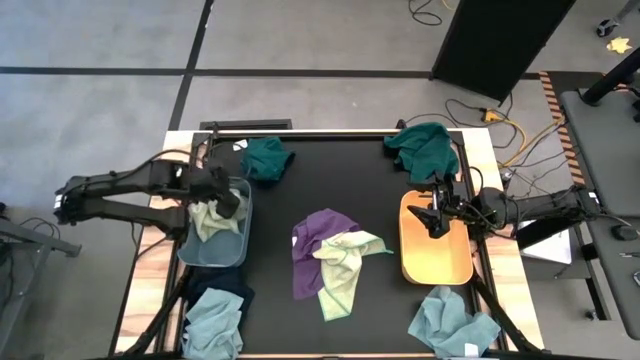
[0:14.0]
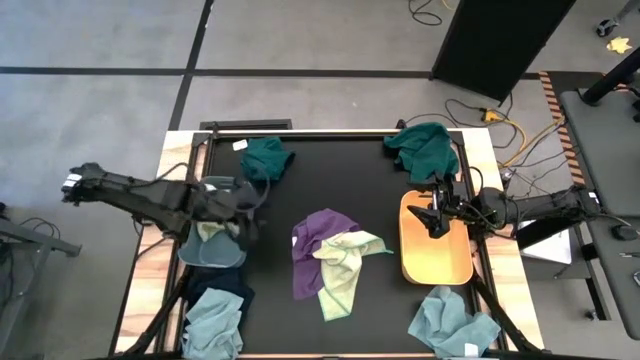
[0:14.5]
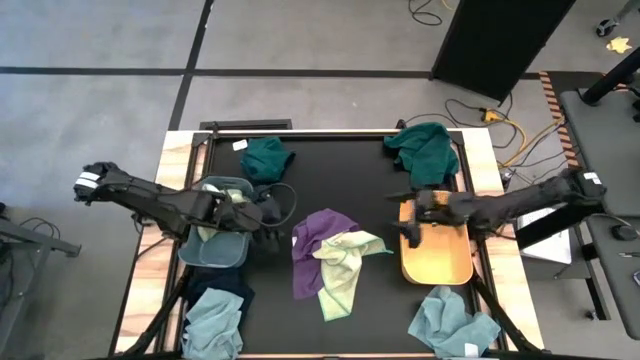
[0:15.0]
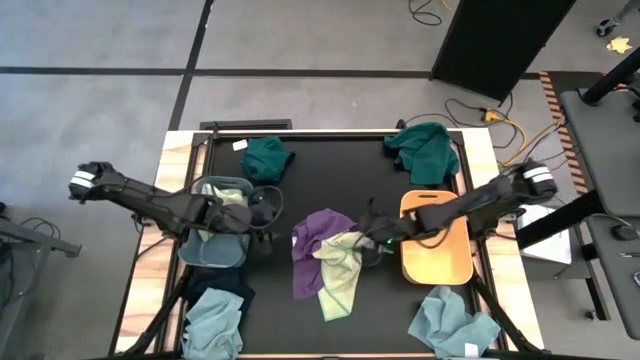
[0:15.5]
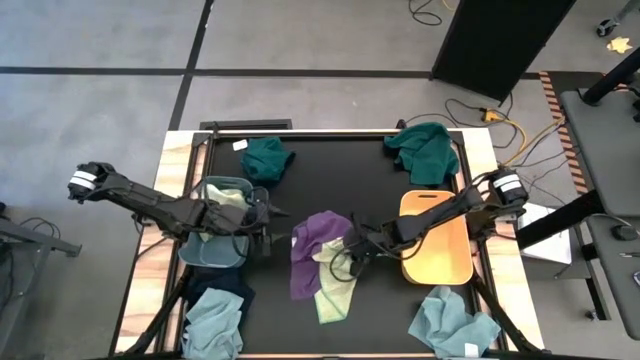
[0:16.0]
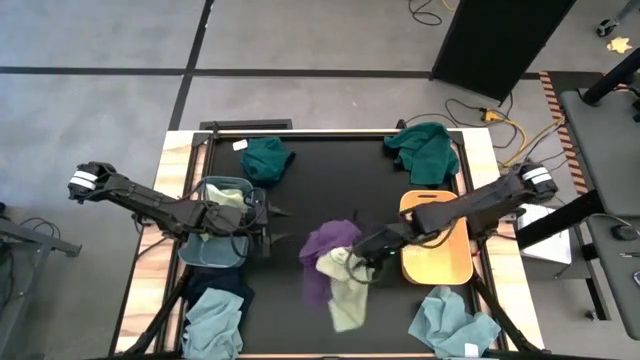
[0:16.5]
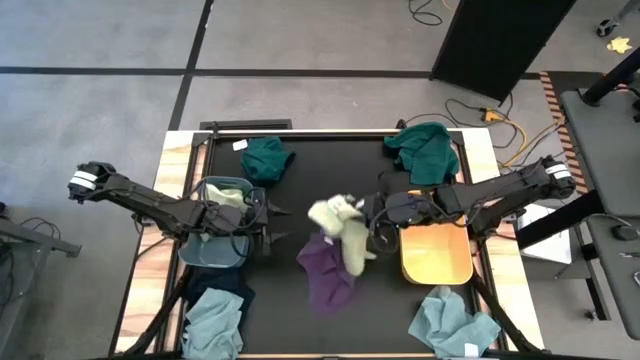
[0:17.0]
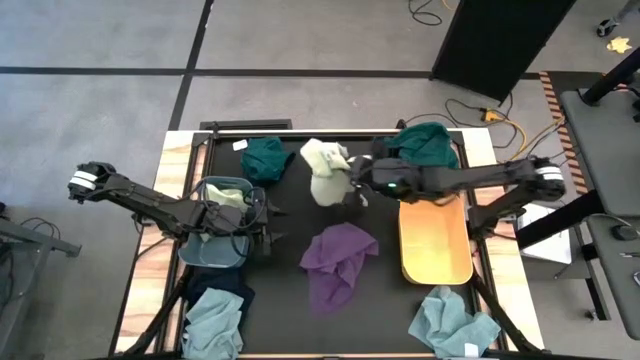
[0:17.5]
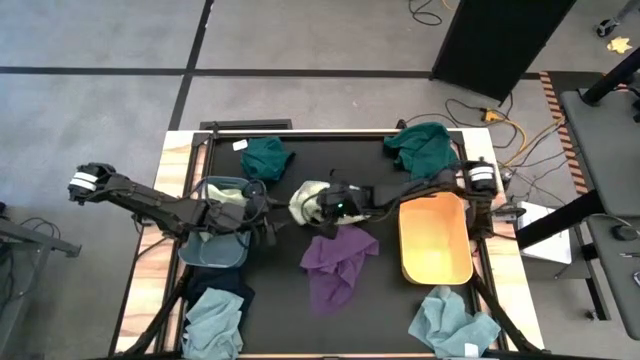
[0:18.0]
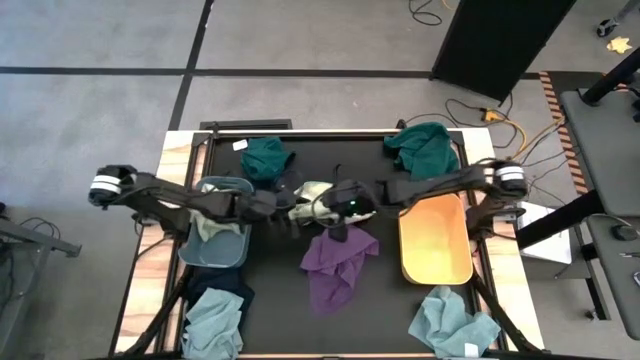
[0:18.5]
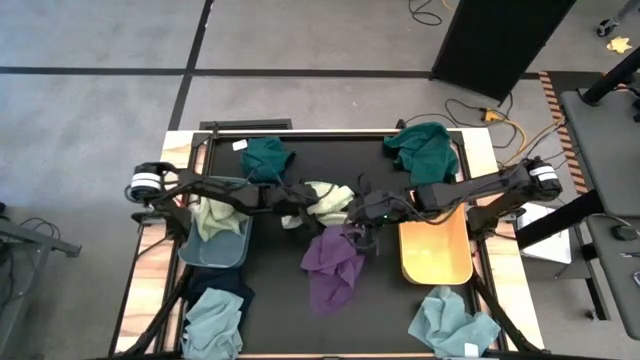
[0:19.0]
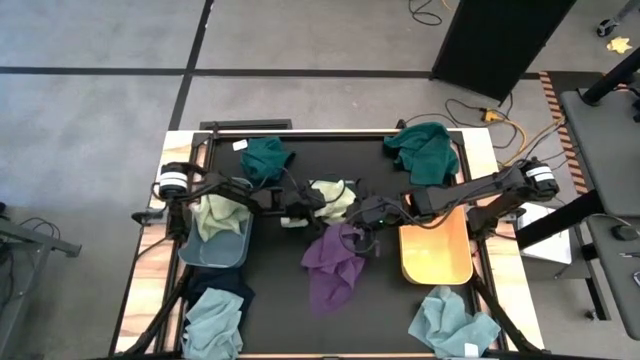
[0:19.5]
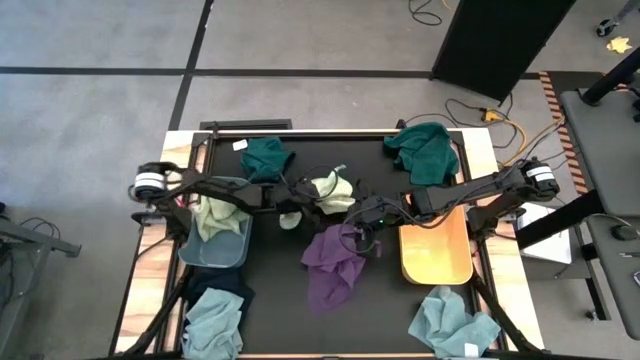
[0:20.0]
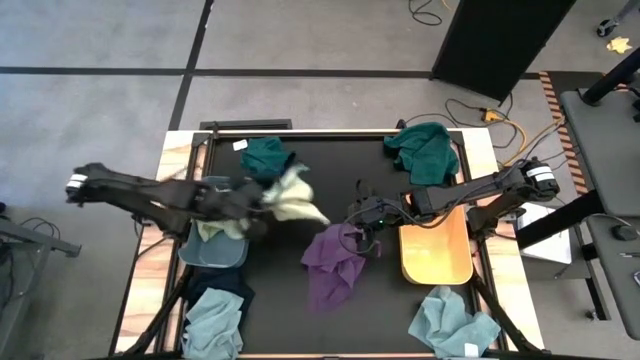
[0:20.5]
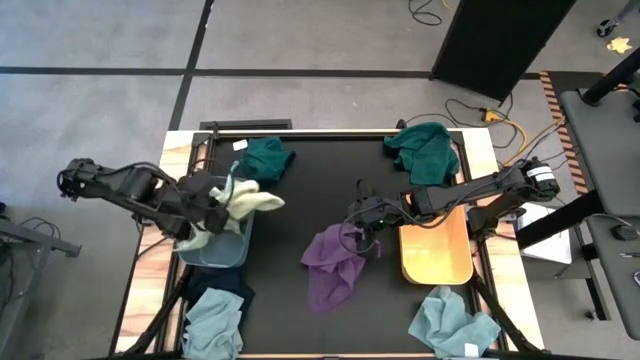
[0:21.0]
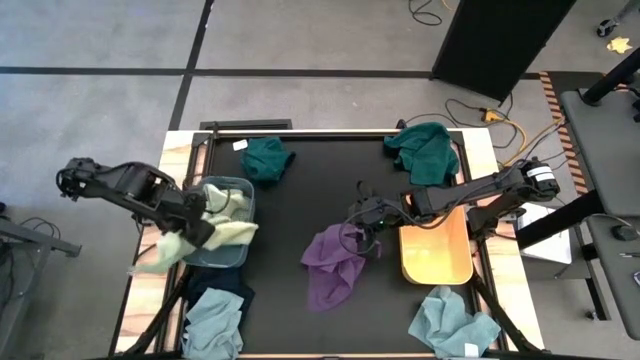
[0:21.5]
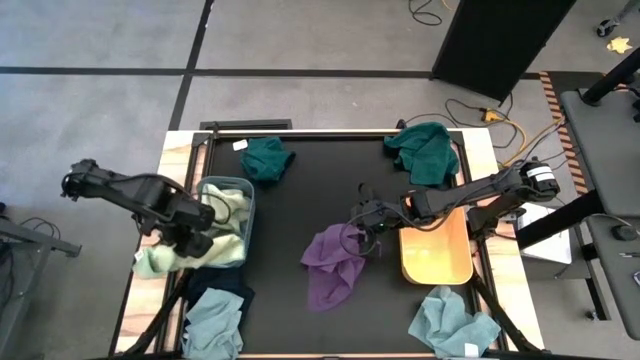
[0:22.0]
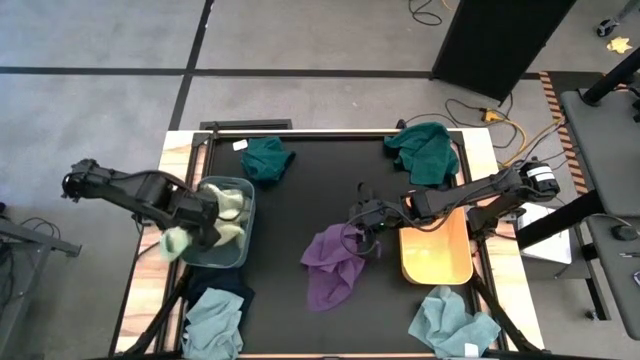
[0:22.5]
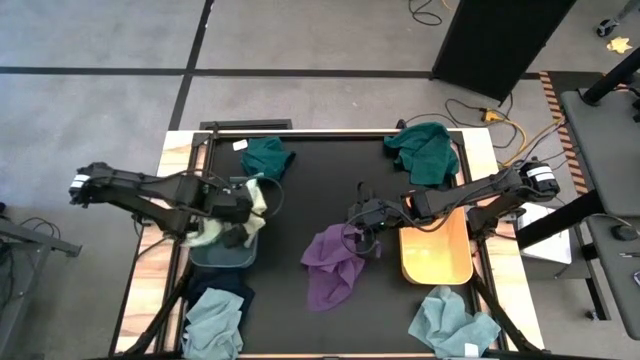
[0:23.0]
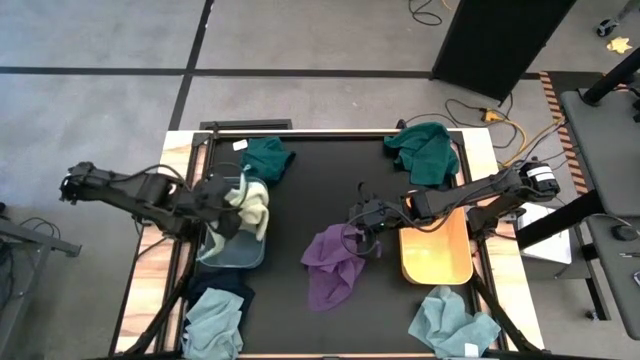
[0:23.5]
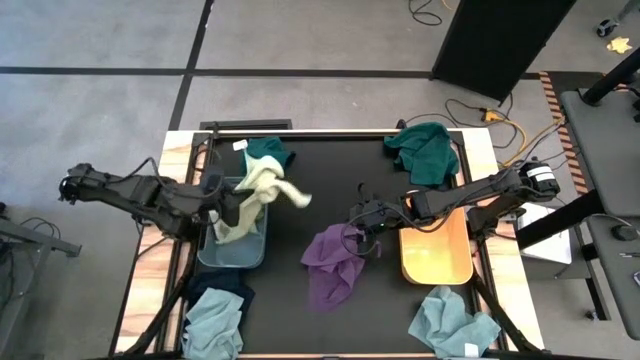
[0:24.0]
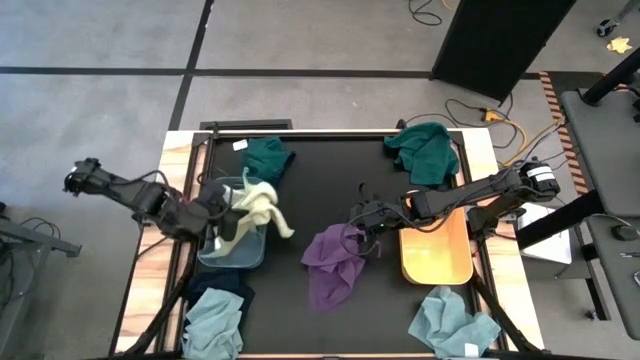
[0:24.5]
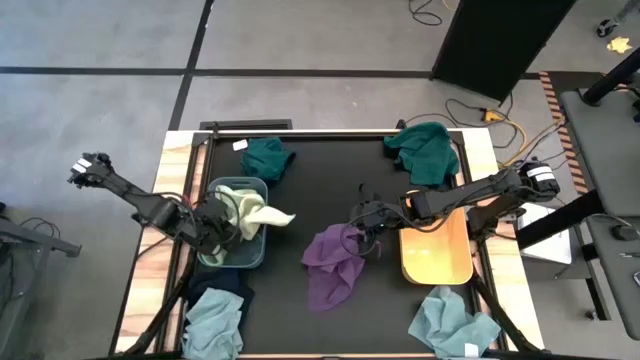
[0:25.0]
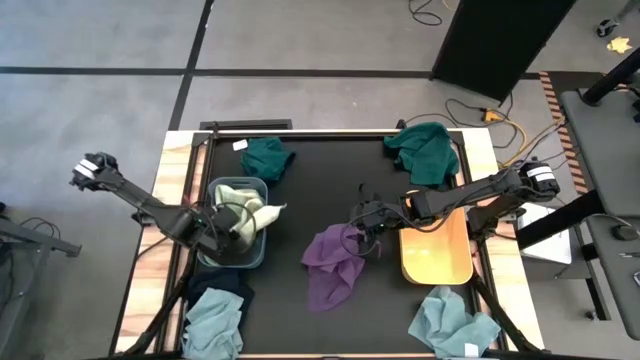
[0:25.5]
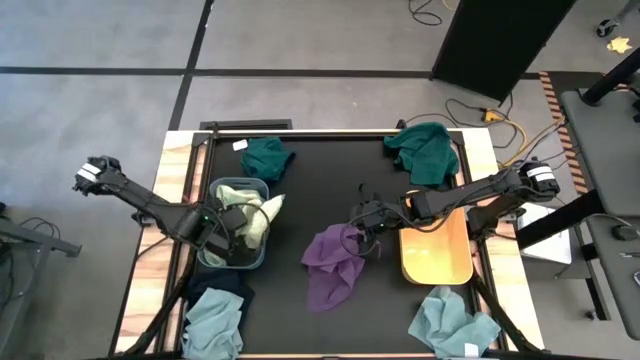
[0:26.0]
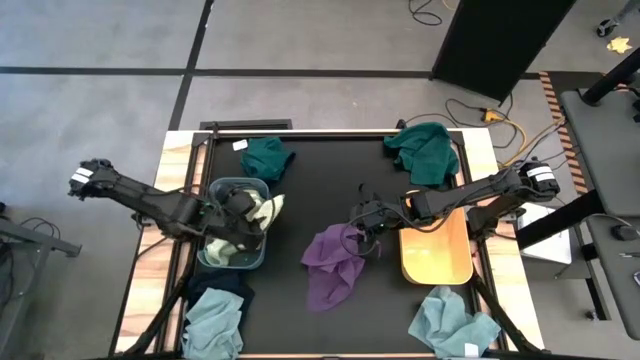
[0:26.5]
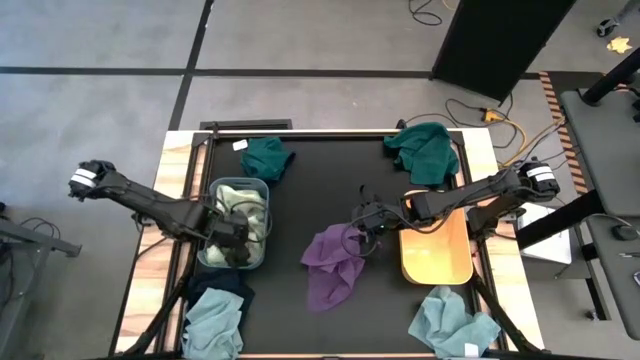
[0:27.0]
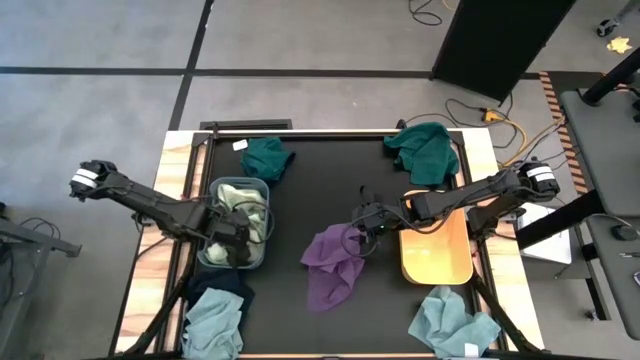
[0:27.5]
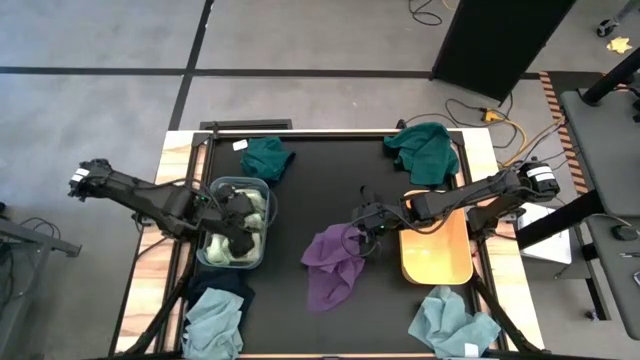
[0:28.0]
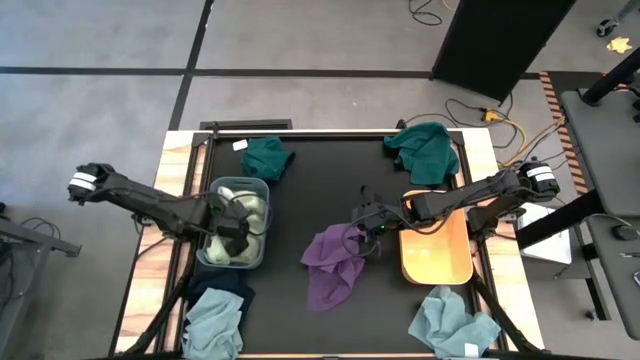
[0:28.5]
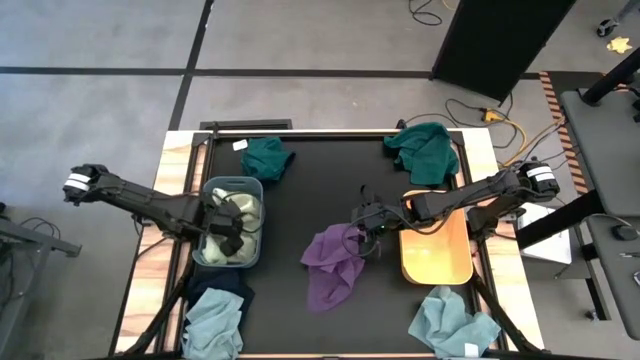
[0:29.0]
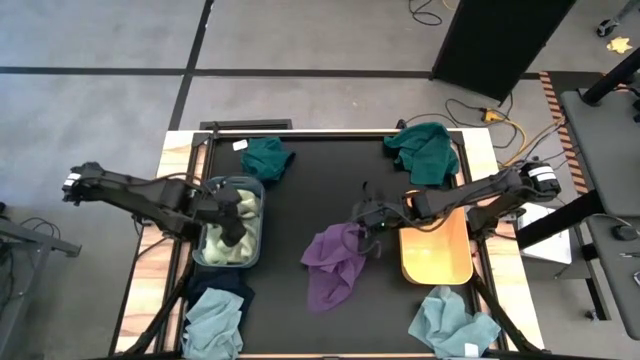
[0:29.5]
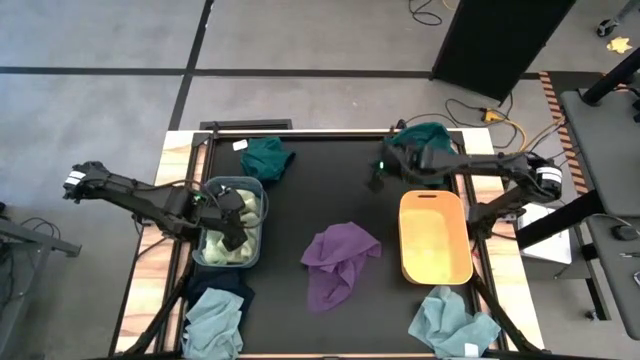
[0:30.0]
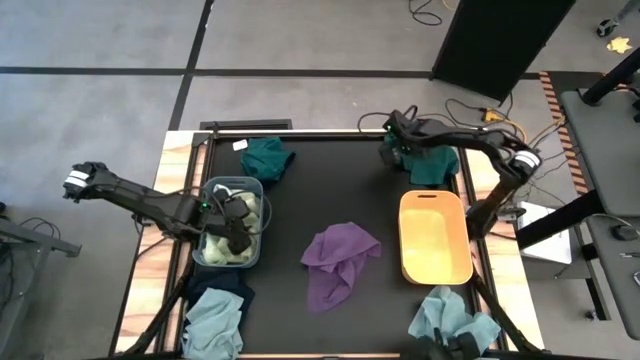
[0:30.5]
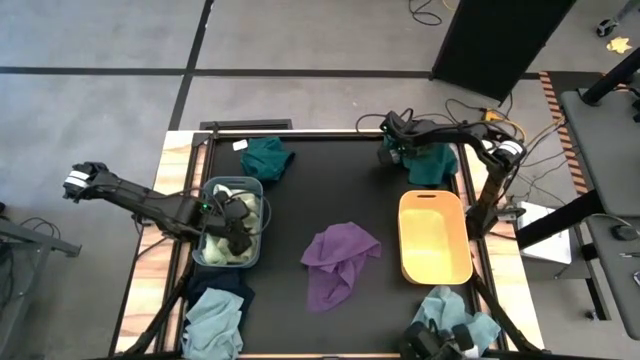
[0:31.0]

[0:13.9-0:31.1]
Task: Sort microfiber towel by color & place in baskets
Put the light green microfiber towel into the blue bin

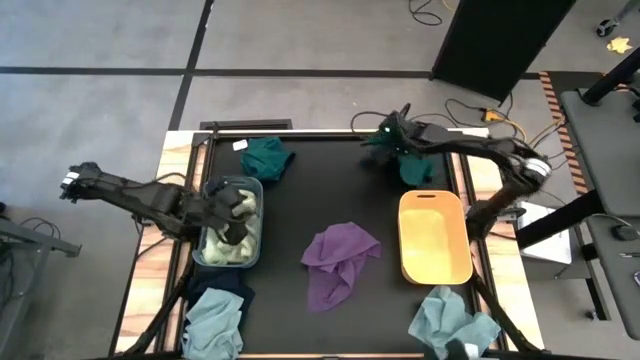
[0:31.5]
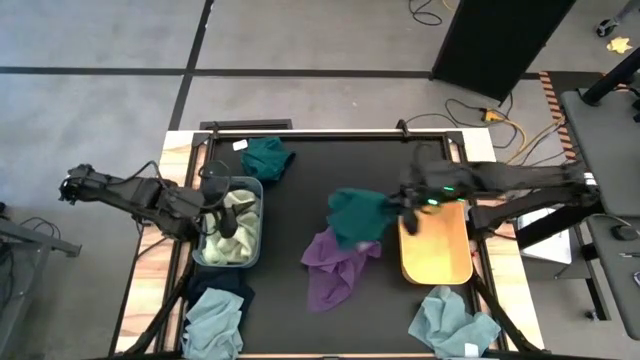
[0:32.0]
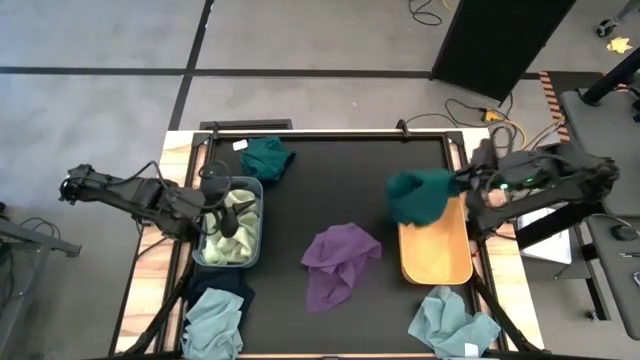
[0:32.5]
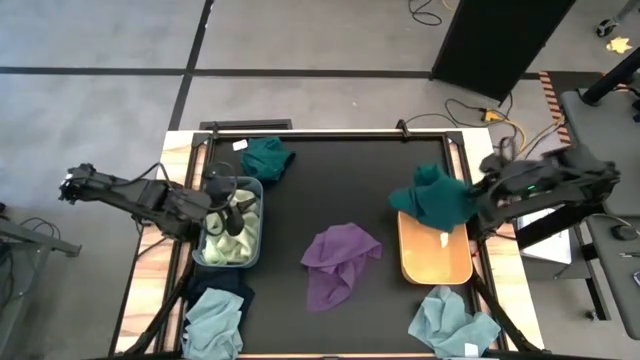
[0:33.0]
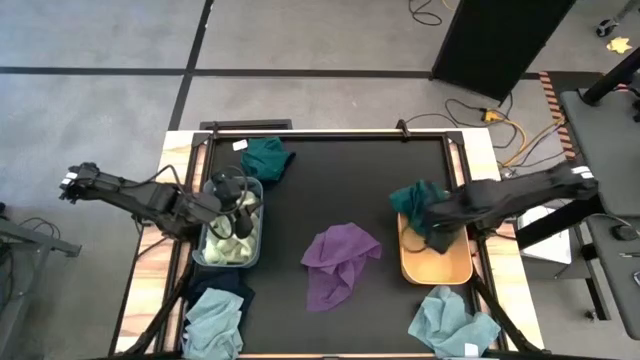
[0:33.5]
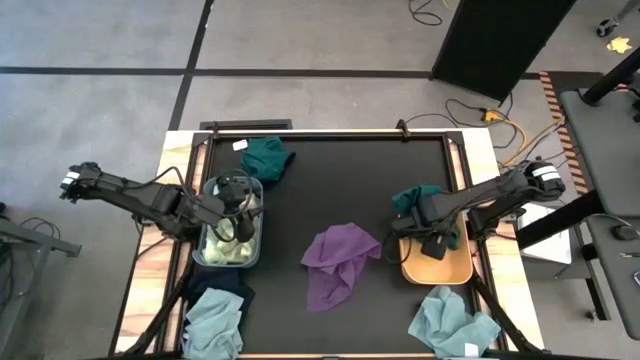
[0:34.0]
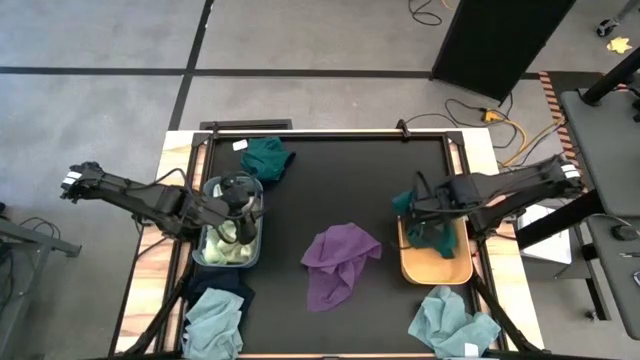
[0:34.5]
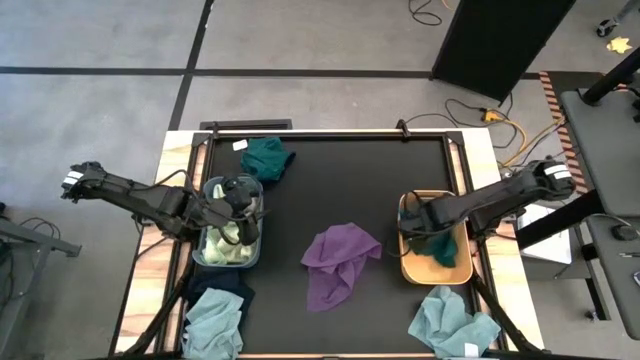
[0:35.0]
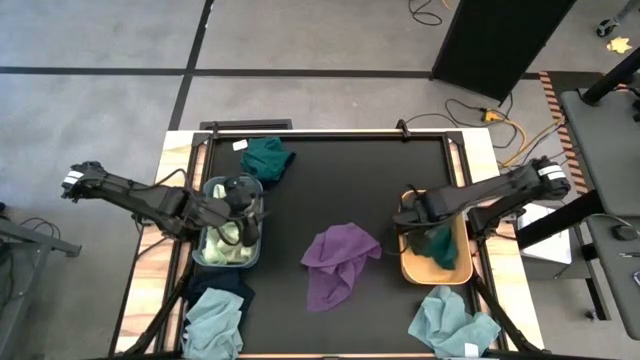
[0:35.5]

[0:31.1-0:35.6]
Put the right green towel into the yellow bin
